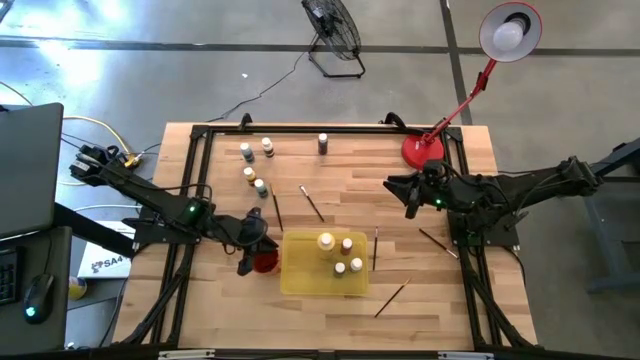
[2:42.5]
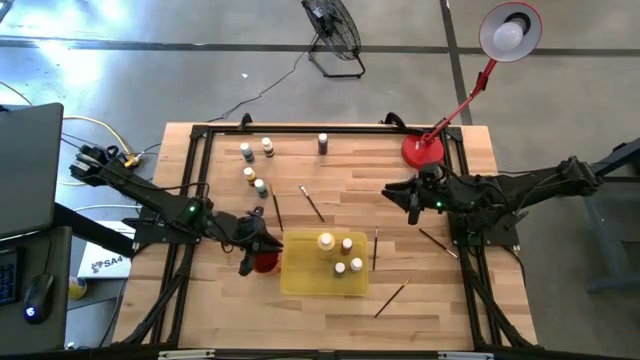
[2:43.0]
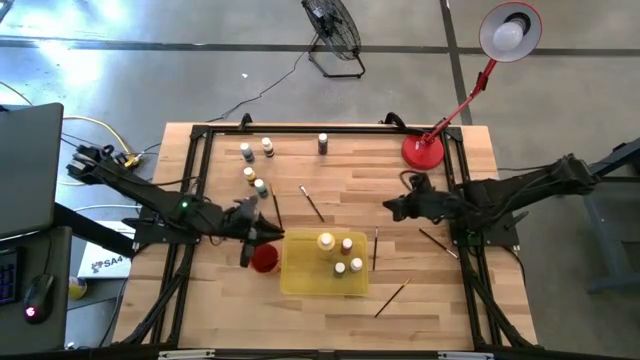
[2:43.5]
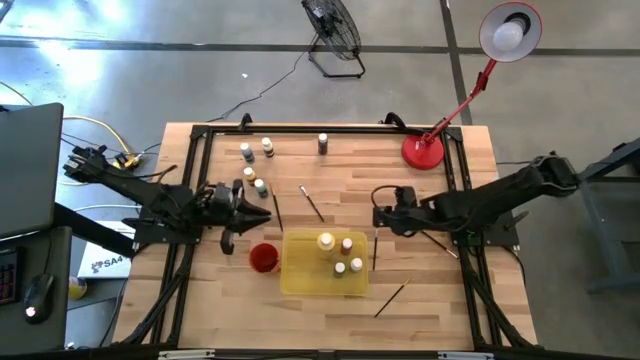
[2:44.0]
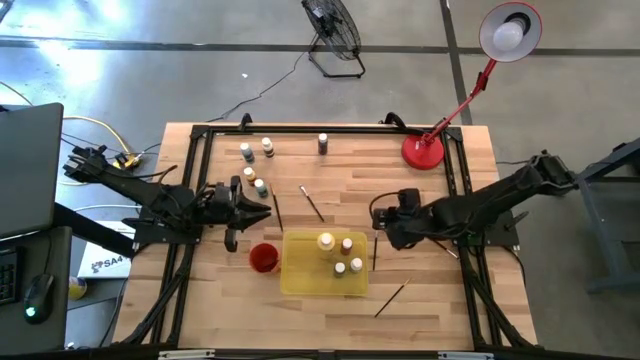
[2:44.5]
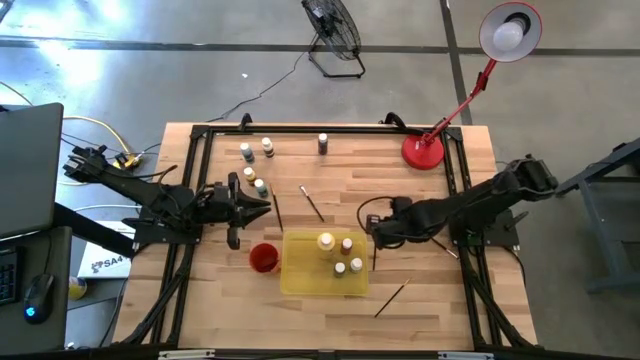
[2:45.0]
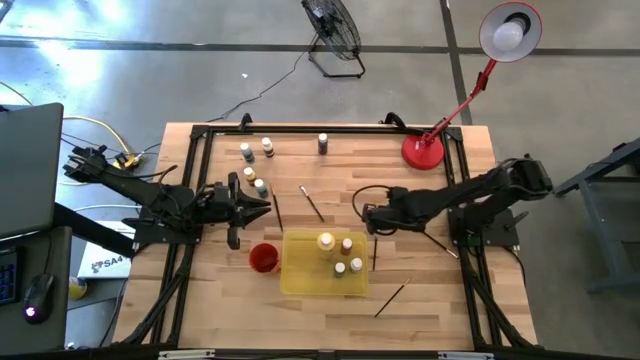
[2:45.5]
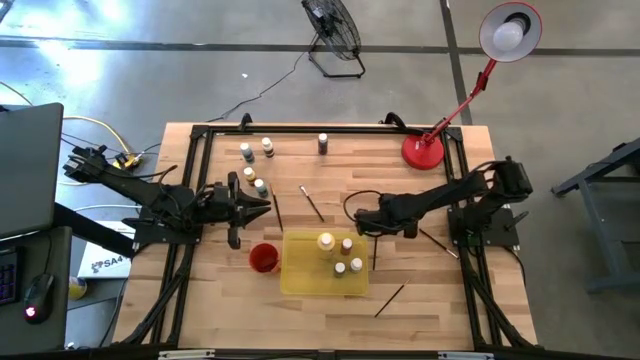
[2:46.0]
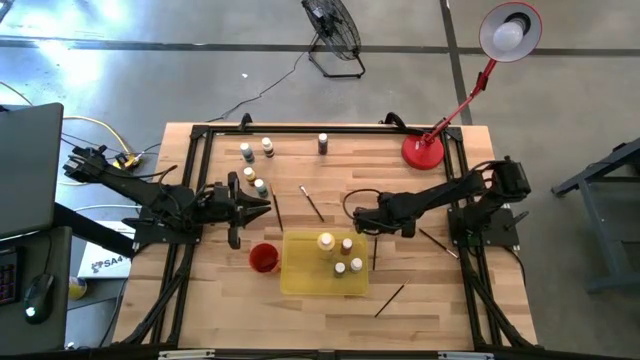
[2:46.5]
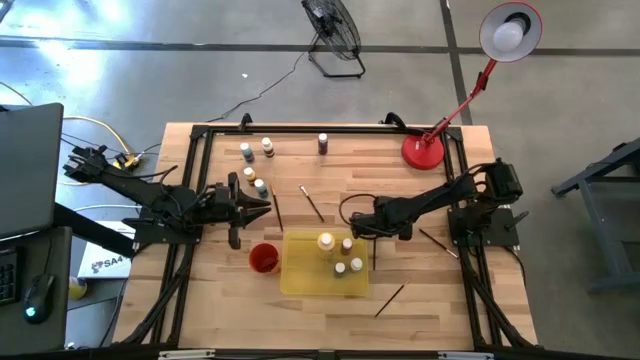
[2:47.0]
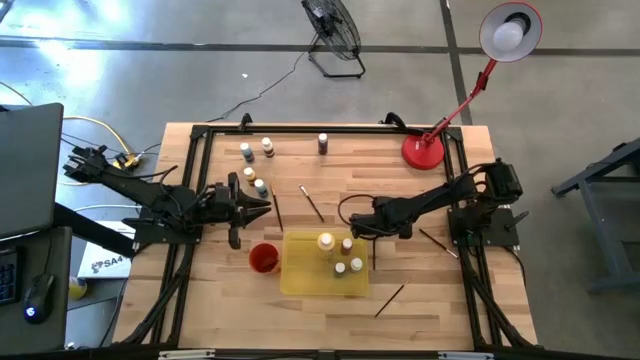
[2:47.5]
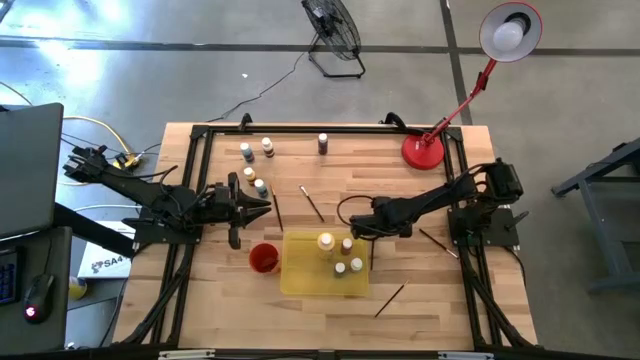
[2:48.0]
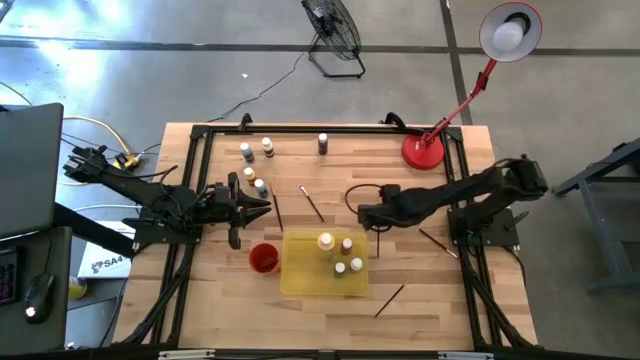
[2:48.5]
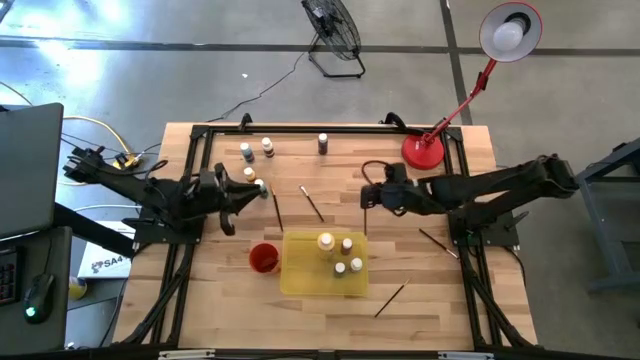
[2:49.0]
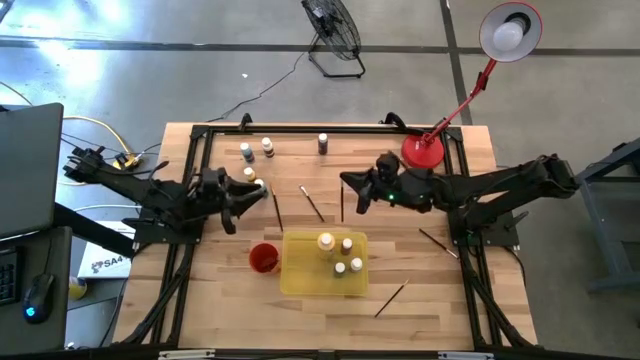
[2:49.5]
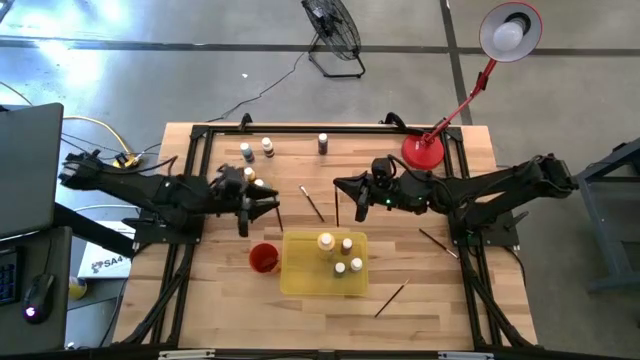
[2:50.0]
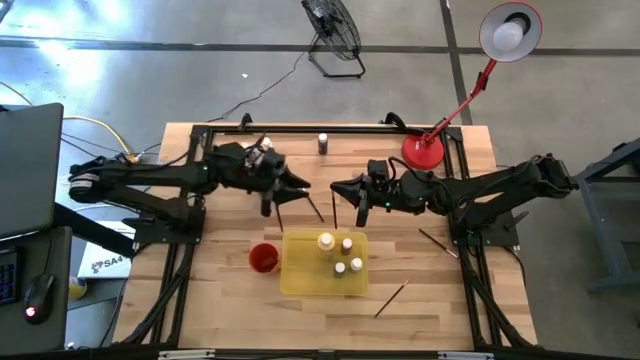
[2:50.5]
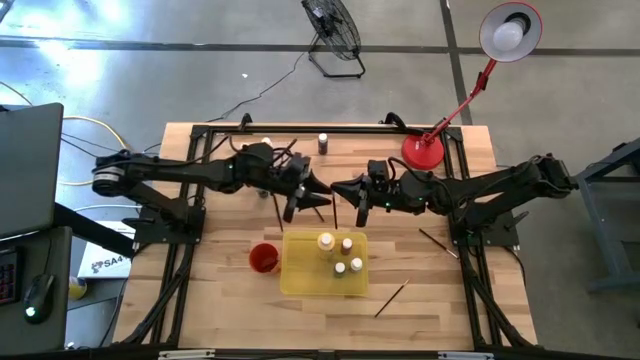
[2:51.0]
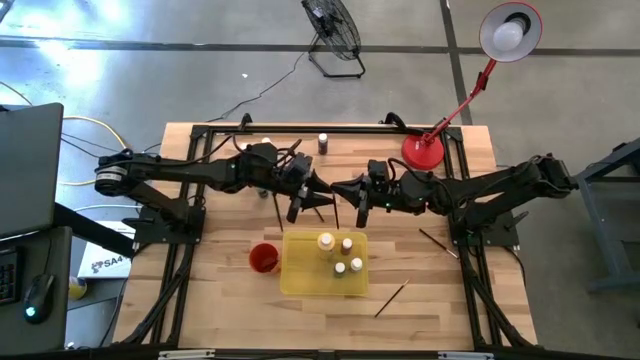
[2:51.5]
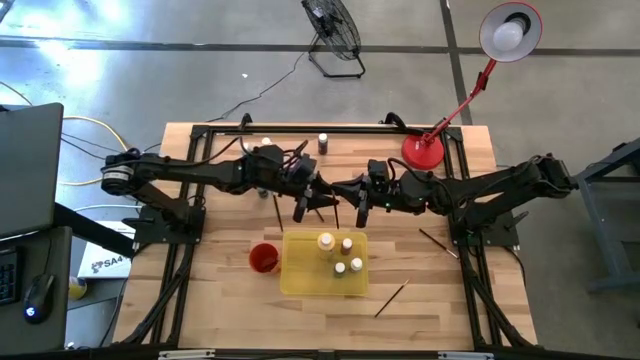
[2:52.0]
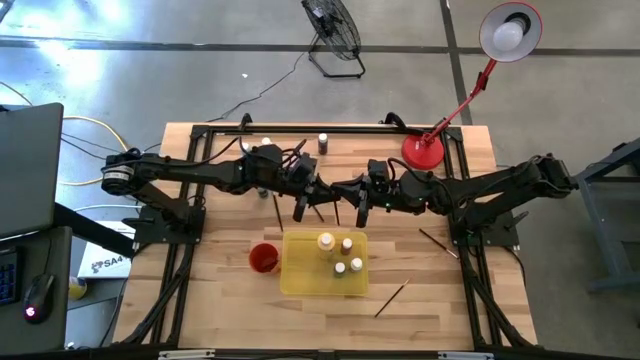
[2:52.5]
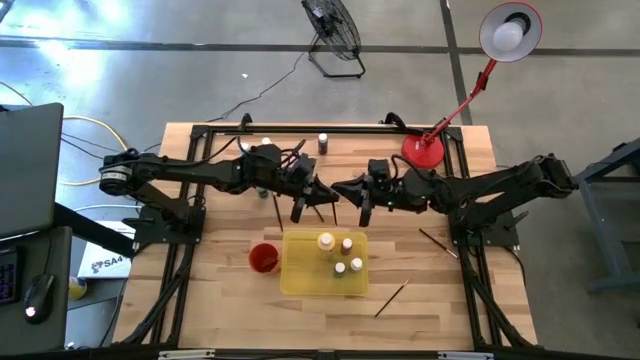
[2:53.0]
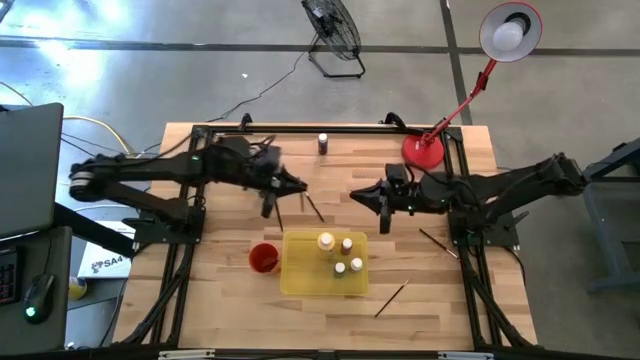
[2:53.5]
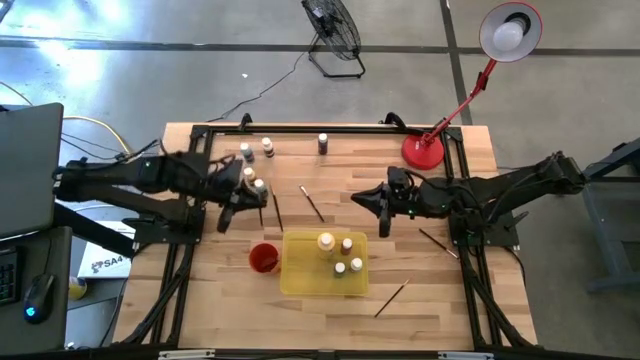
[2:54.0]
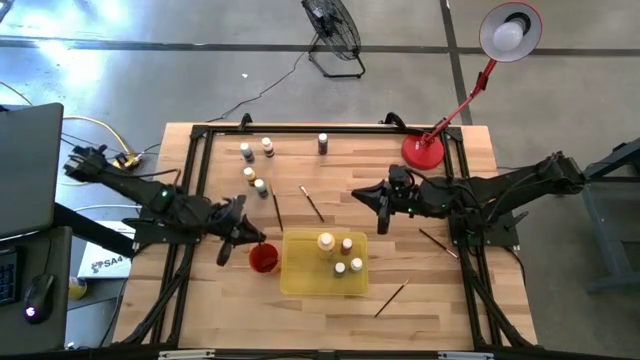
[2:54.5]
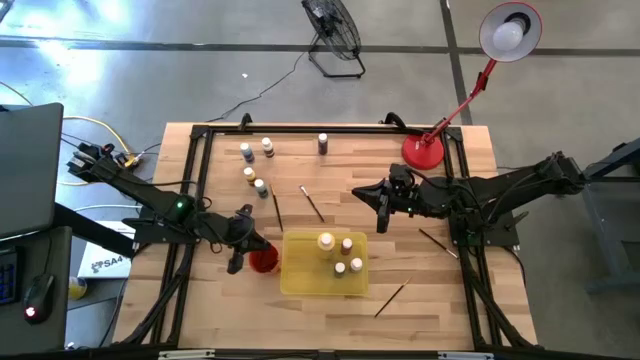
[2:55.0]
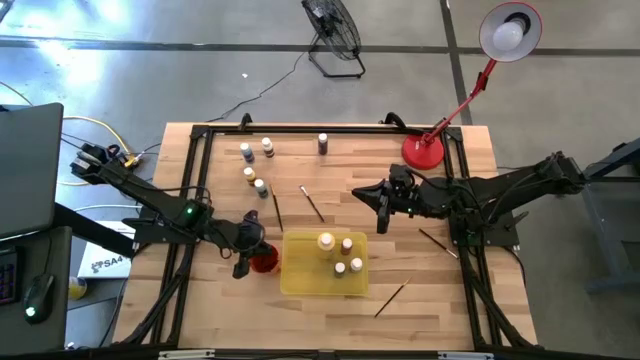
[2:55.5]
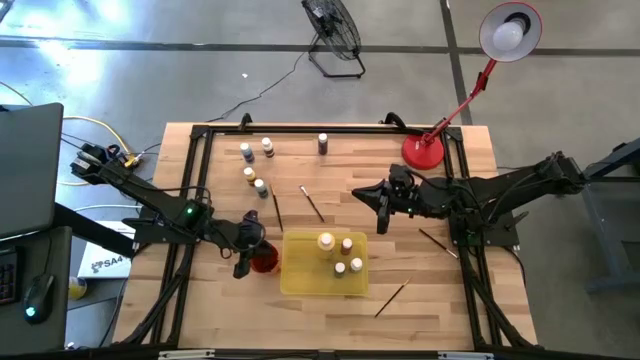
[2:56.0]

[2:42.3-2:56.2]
Task: Pick & Place Paint Supplies
Put the silver paintbrush into the orange cup

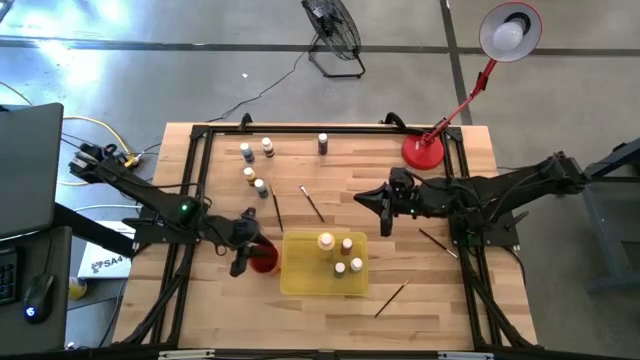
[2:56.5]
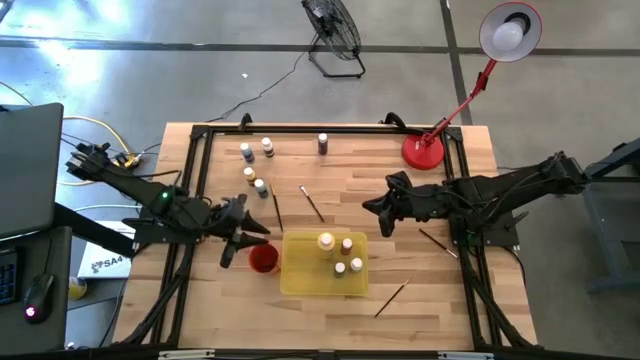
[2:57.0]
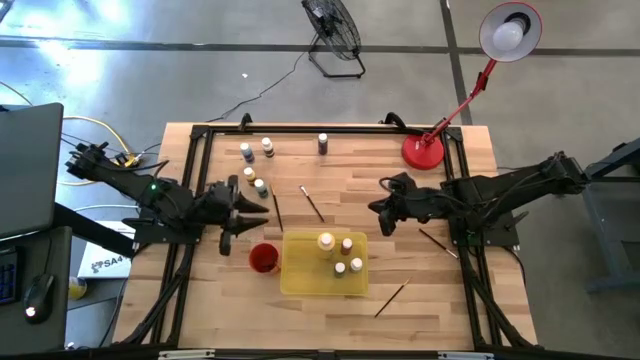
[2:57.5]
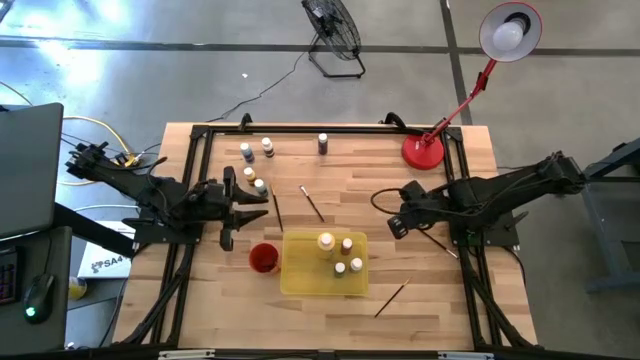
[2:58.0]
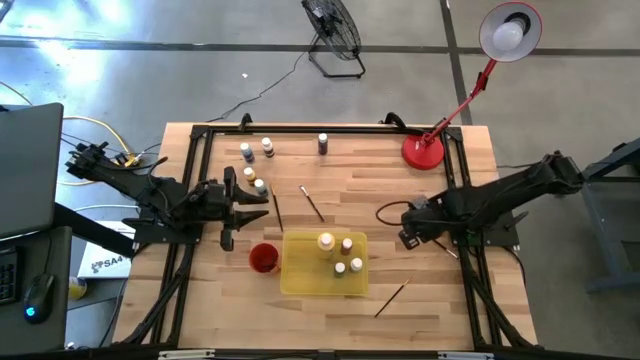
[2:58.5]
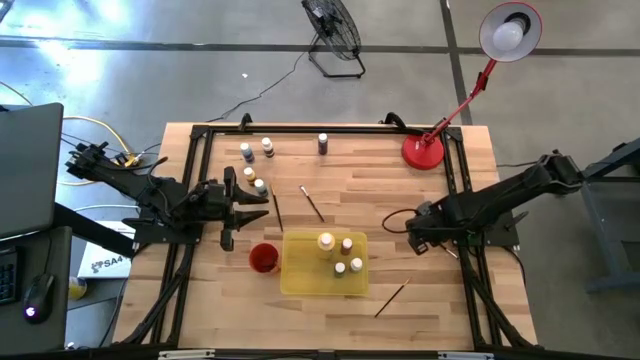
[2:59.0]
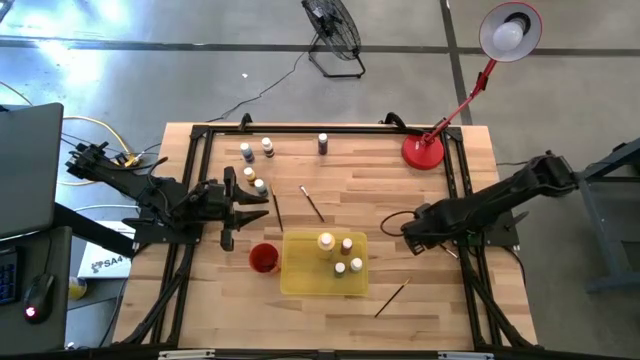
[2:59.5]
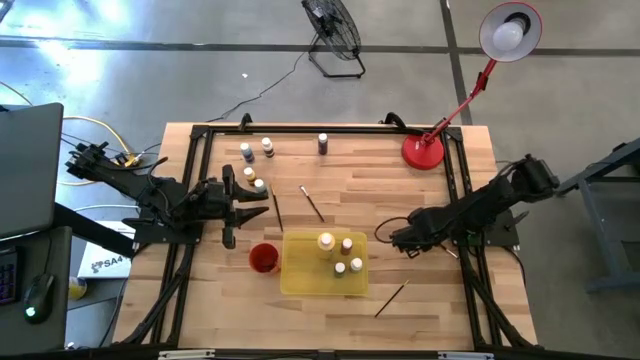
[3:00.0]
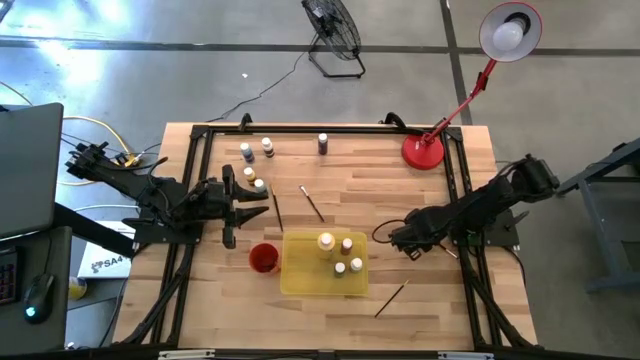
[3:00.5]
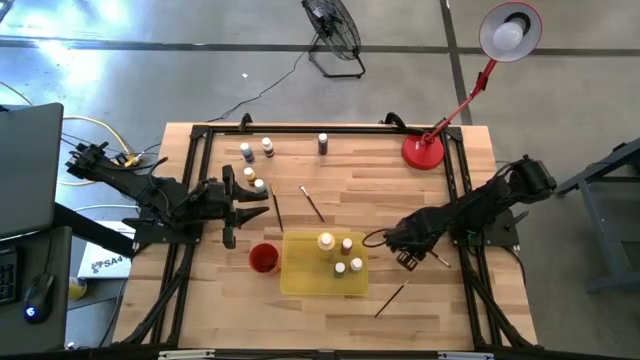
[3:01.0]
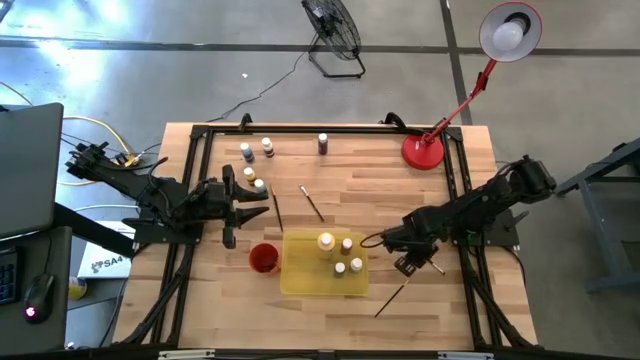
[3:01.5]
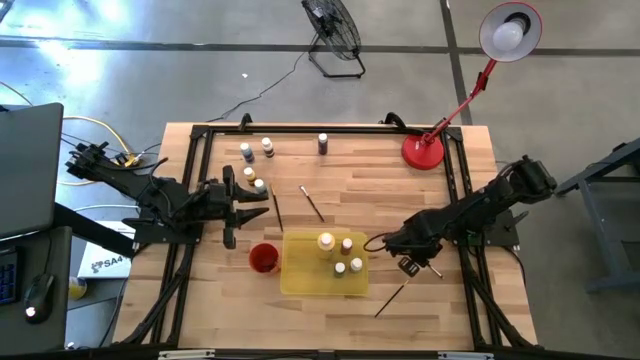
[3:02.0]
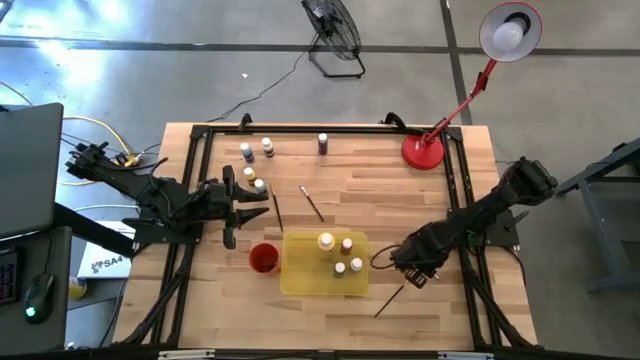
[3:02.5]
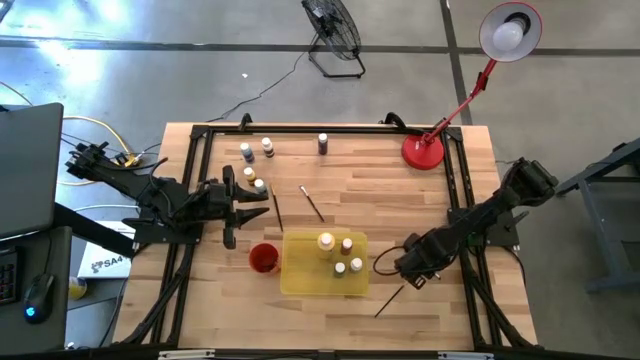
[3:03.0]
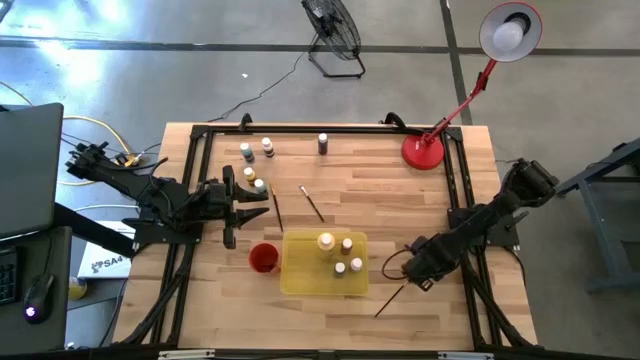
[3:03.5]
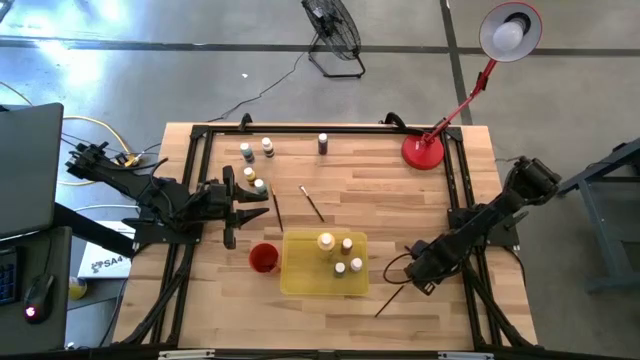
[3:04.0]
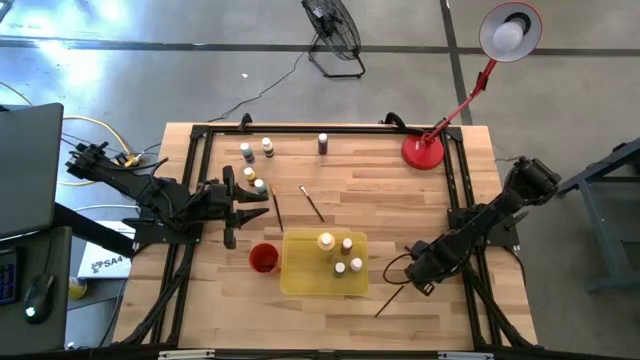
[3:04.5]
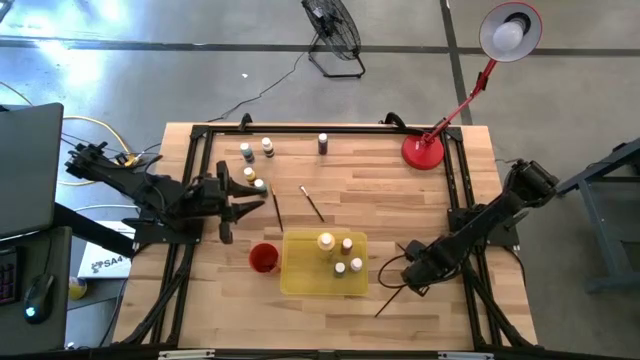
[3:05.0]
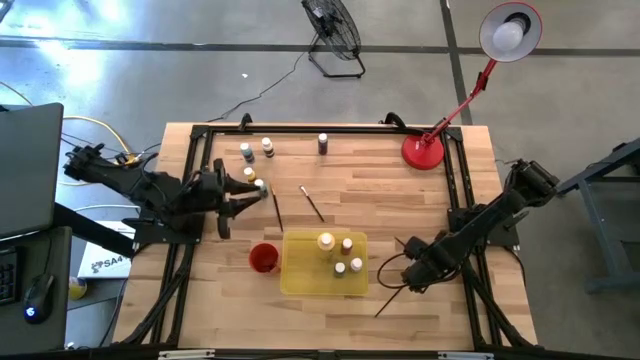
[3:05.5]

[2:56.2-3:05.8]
Put the silver paintbrush into the orange cup
